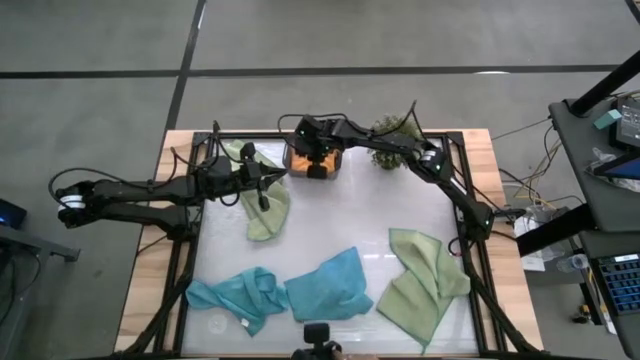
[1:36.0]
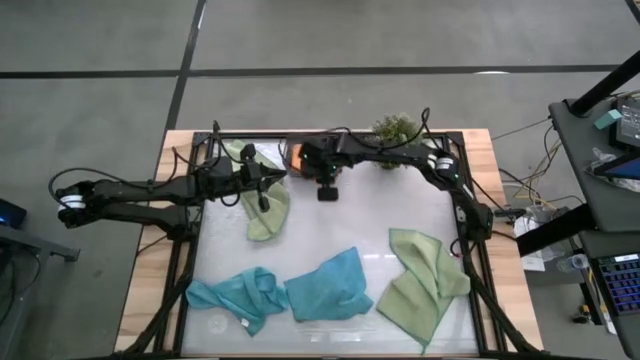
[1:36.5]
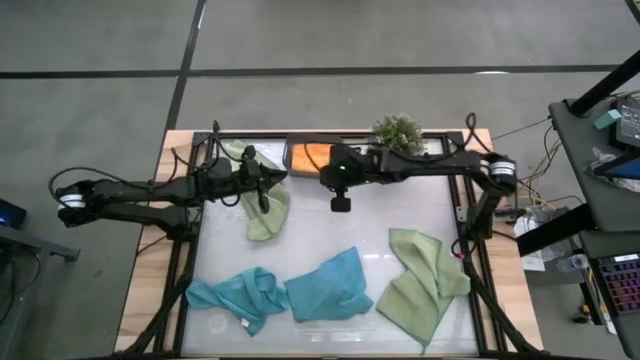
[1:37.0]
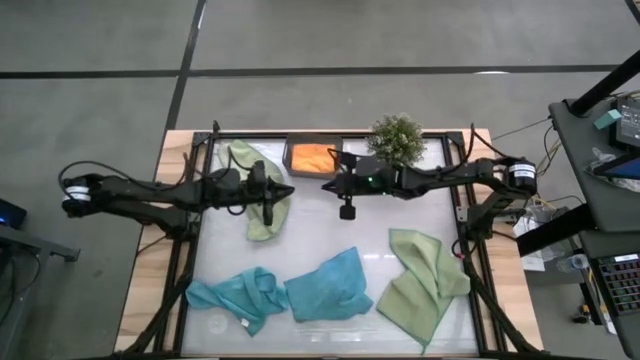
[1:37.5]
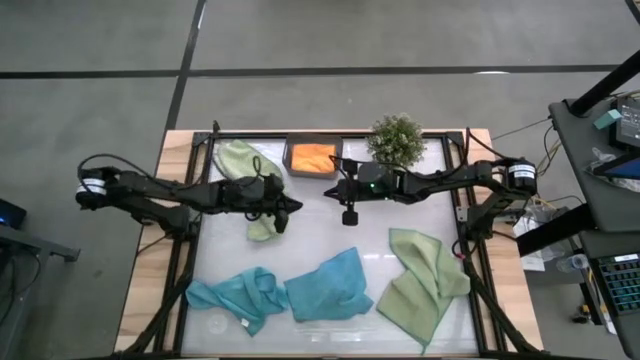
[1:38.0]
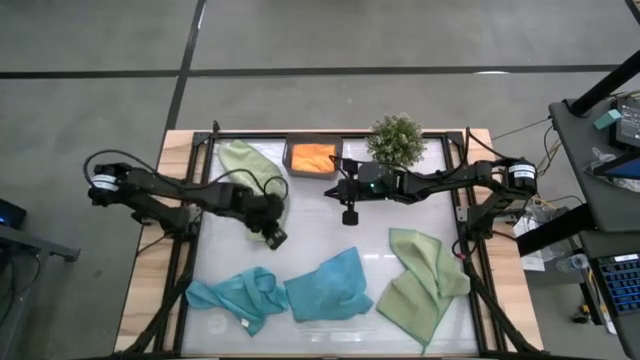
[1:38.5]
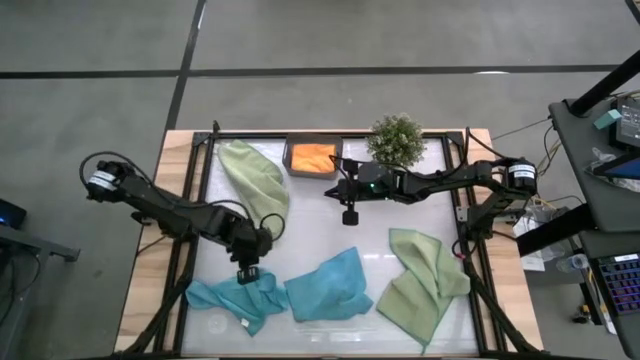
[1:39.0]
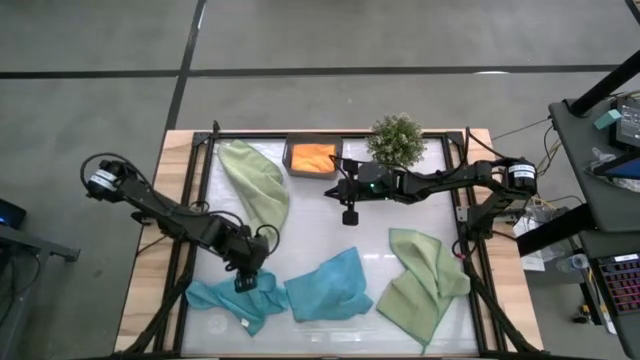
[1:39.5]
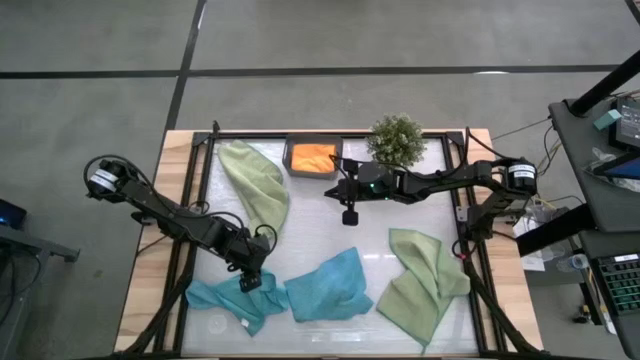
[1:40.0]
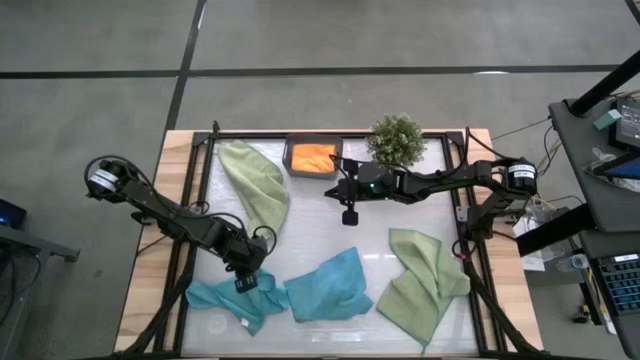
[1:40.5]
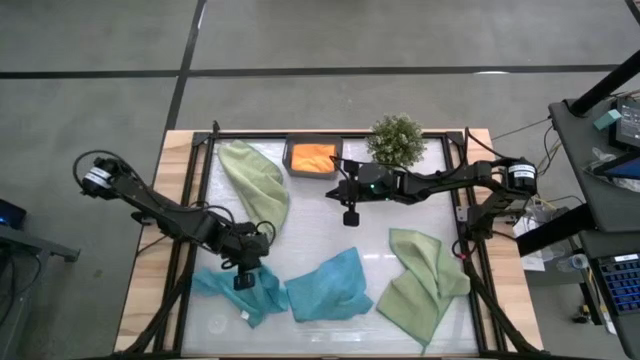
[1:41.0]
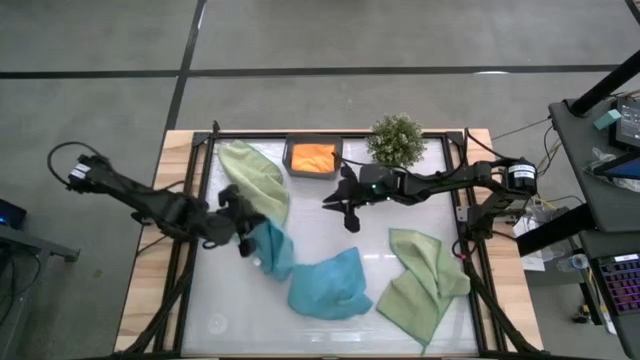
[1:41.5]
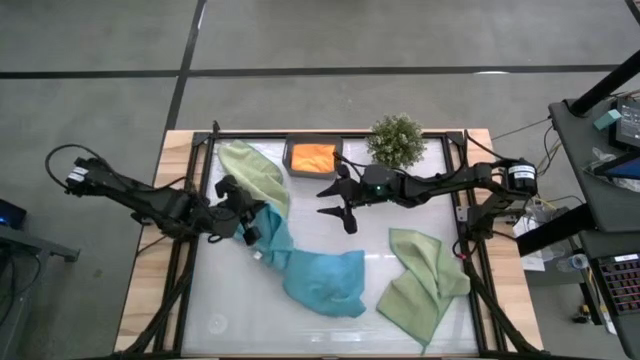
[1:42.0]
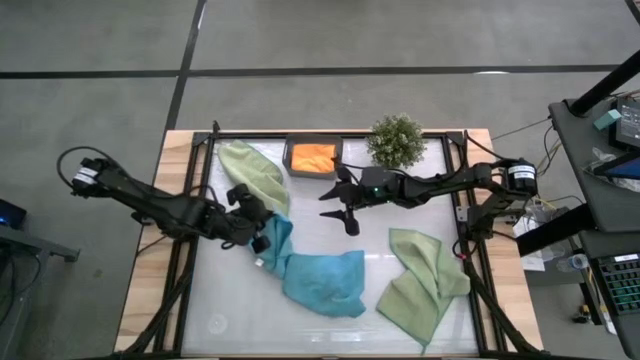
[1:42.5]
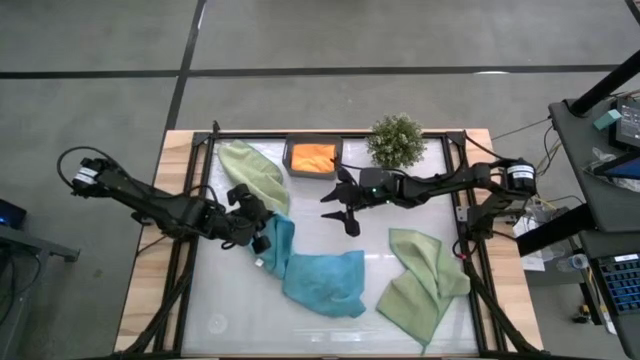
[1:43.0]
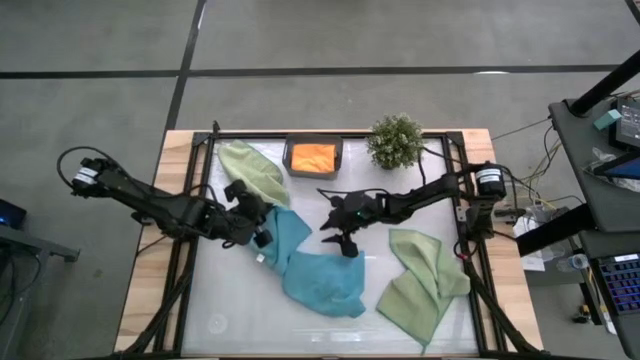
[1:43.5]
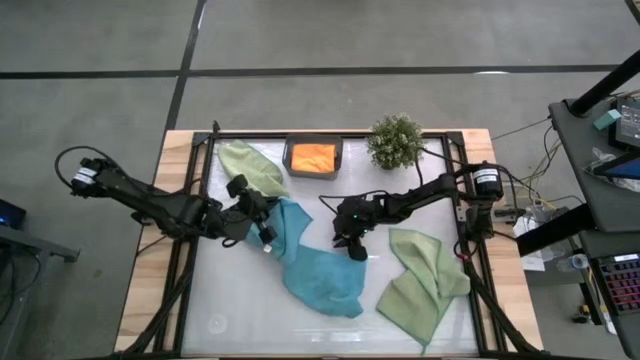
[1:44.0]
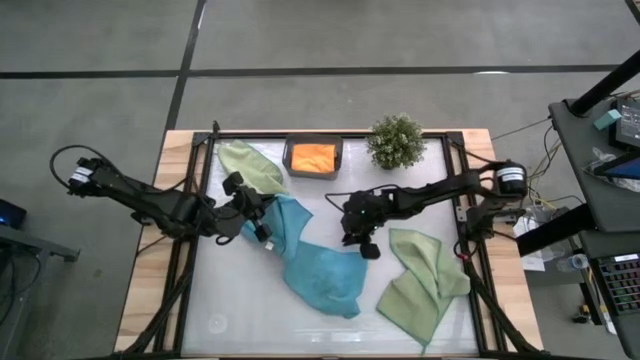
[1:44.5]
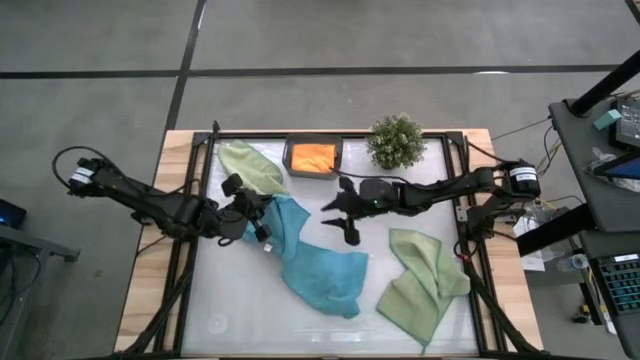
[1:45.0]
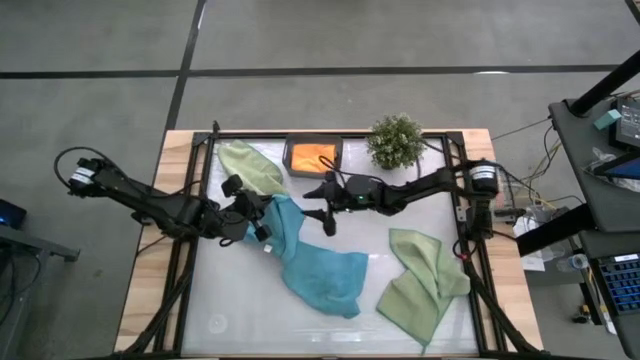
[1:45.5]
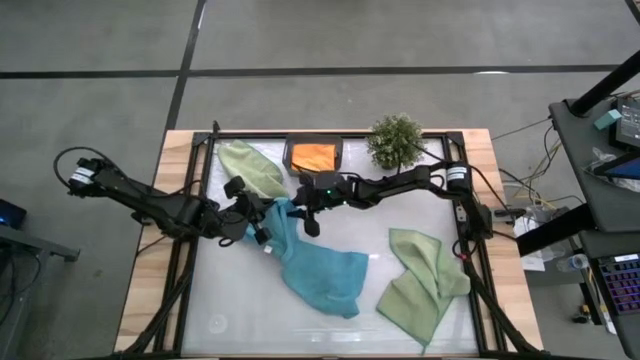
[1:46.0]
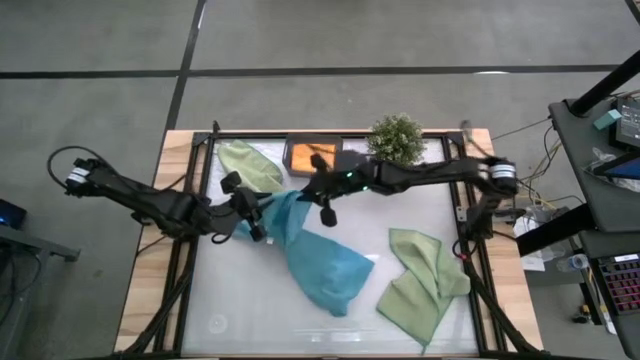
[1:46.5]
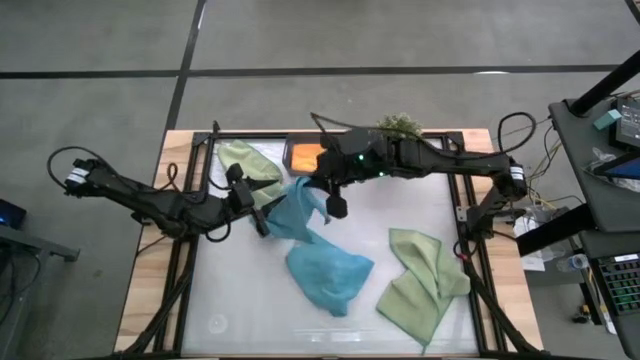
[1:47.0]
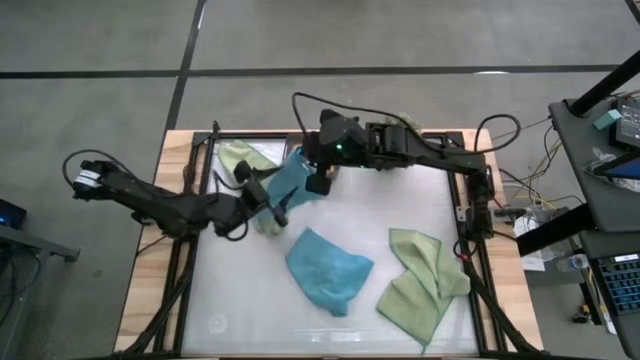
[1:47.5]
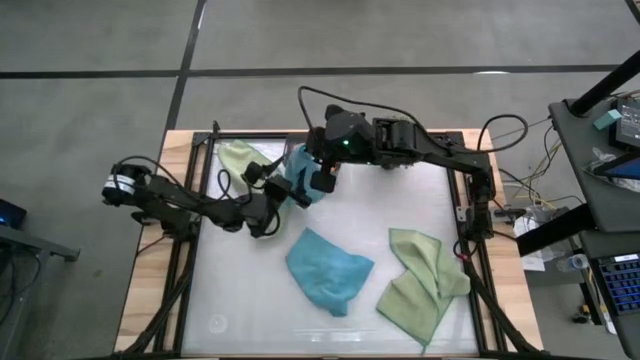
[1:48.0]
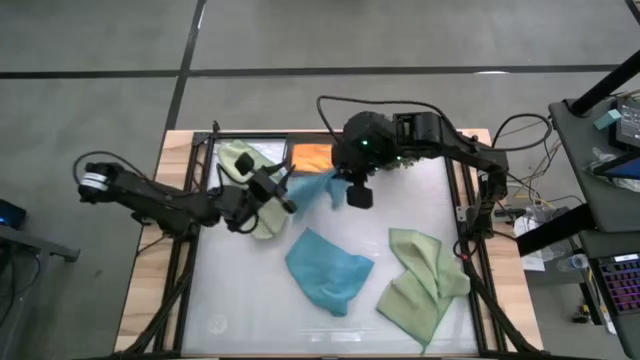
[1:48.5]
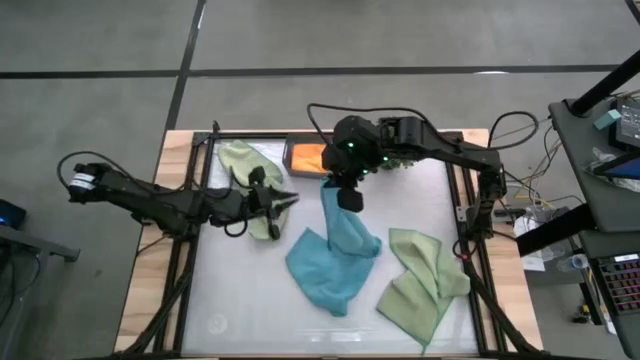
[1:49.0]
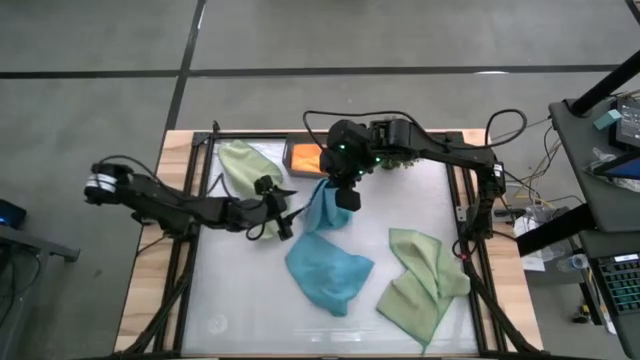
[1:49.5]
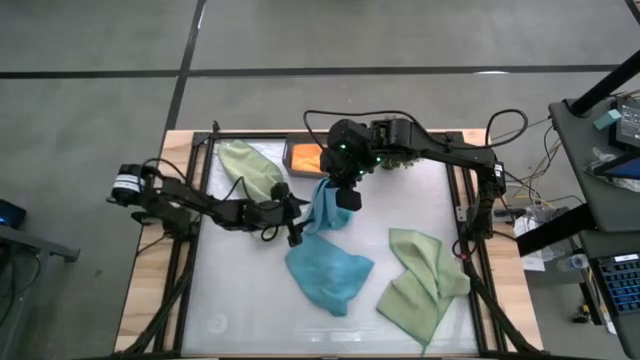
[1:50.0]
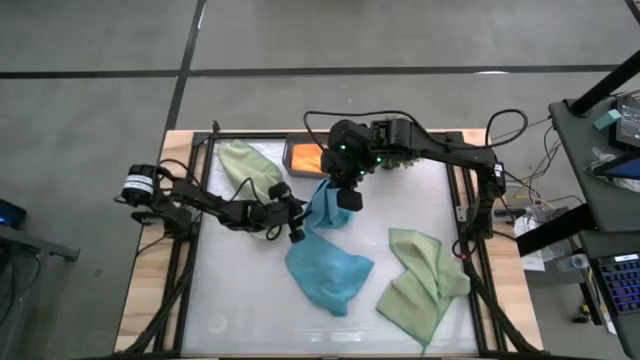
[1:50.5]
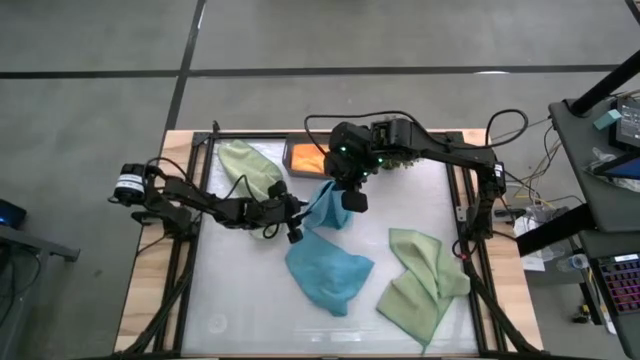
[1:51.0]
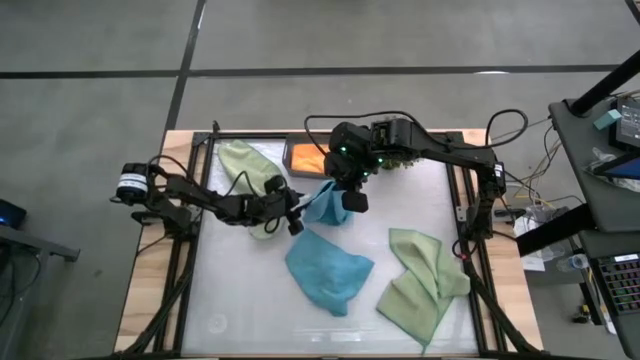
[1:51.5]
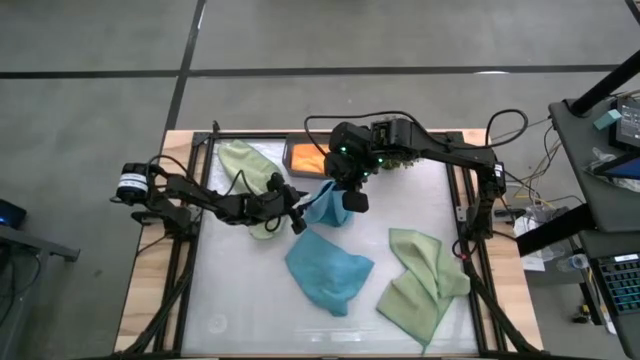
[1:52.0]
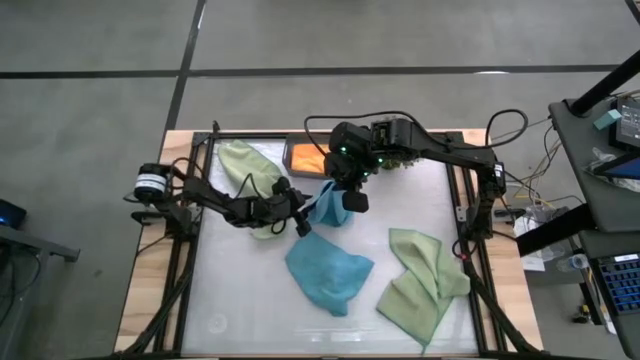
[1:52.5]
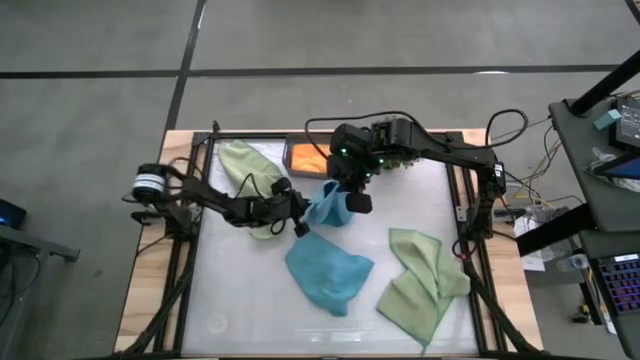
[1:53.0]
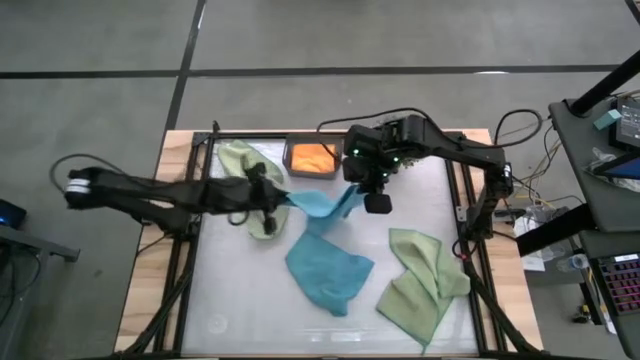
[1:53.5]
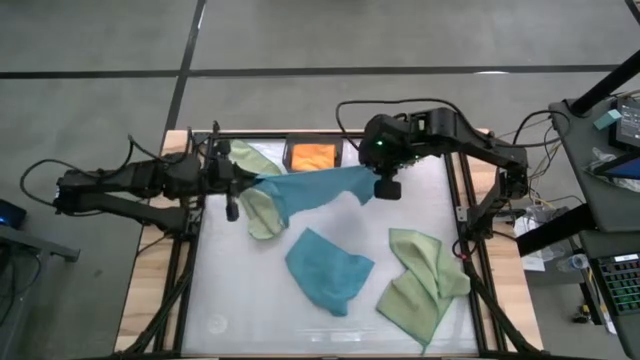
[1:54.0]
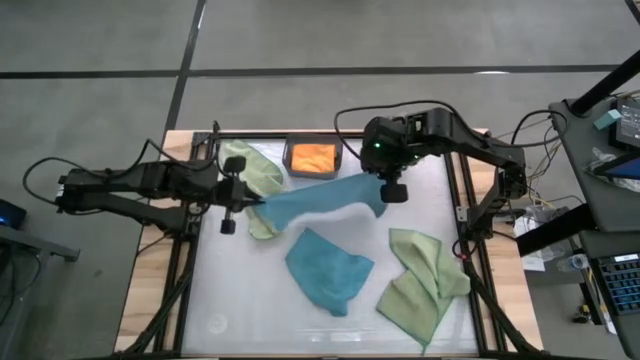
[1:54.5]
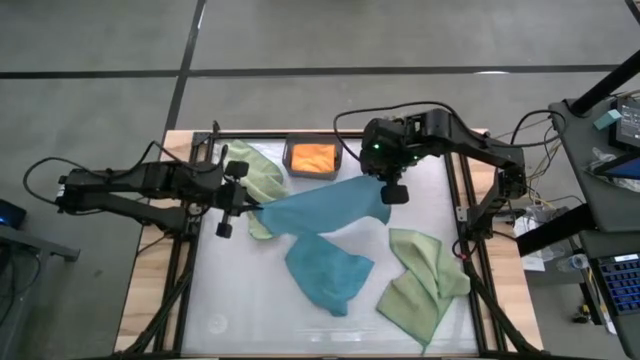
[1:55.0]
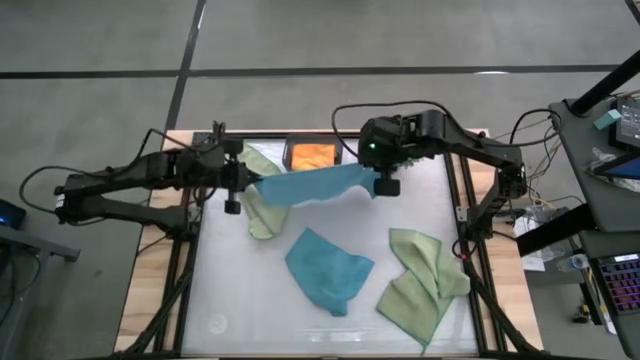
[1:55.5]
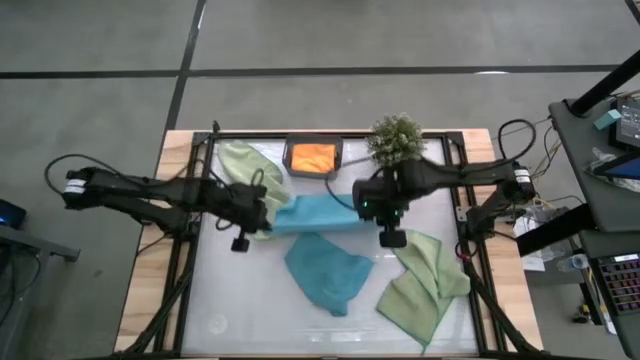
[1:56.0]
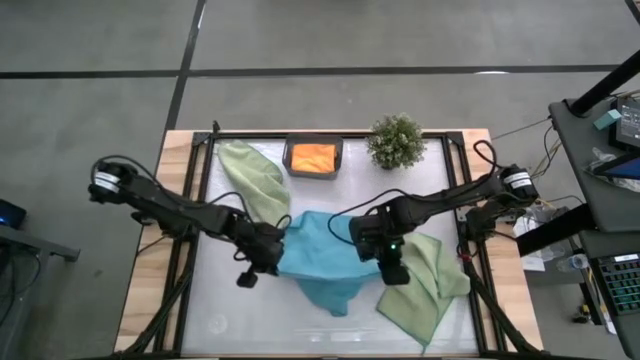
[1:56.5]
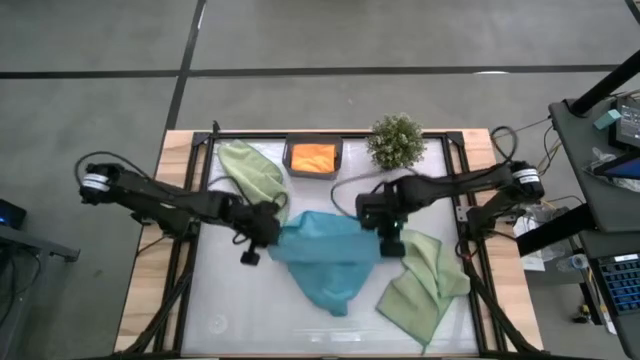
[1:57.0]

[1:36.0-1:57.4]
Task: Fold microfiber towels
Fold the left blue microfiber towel
